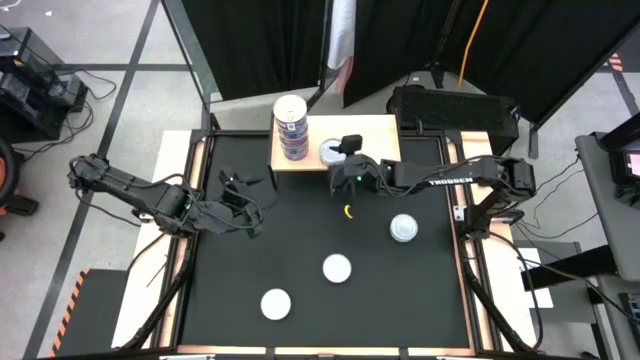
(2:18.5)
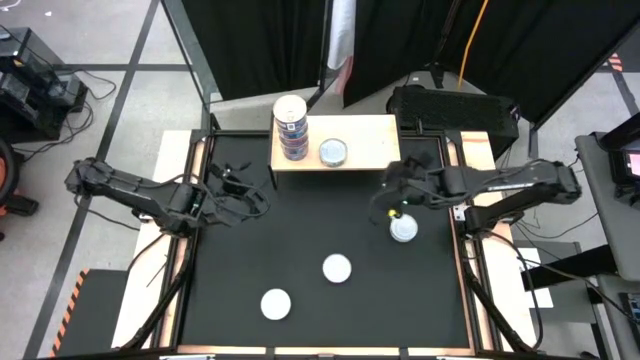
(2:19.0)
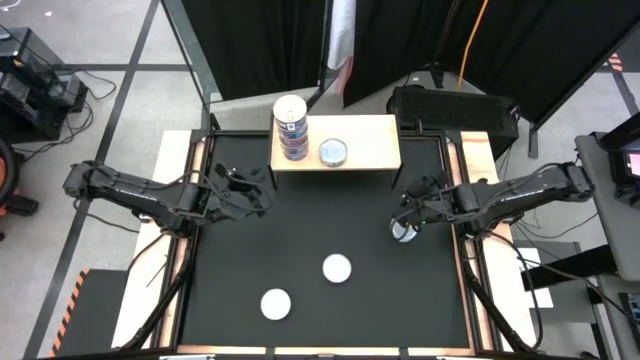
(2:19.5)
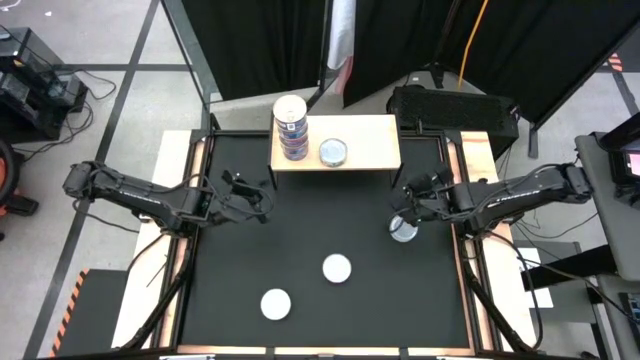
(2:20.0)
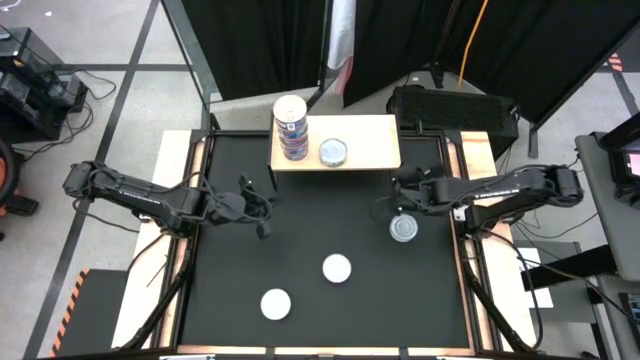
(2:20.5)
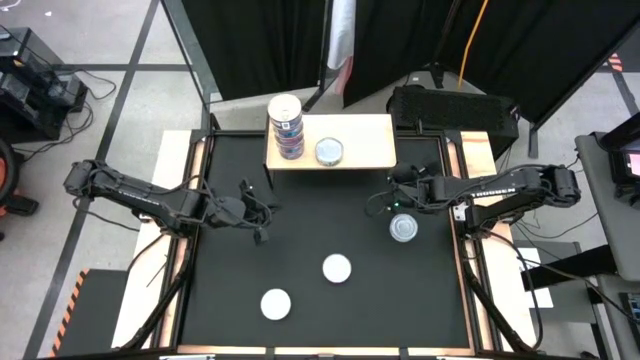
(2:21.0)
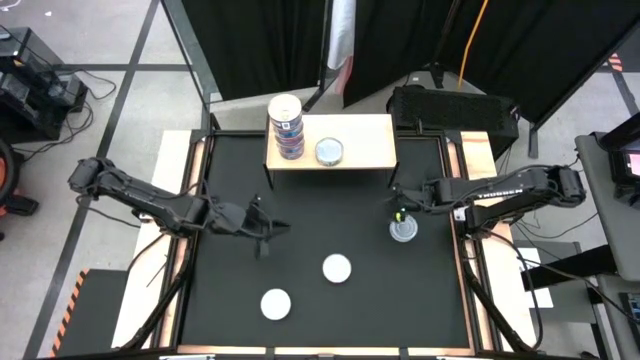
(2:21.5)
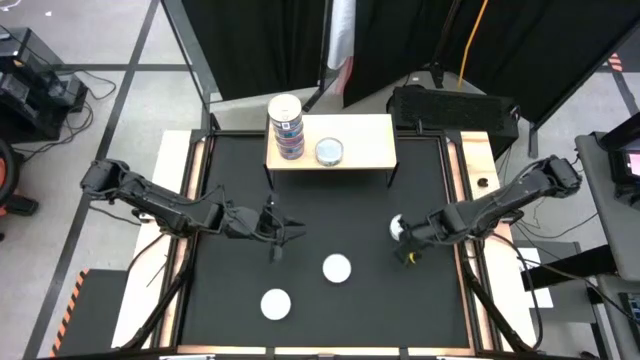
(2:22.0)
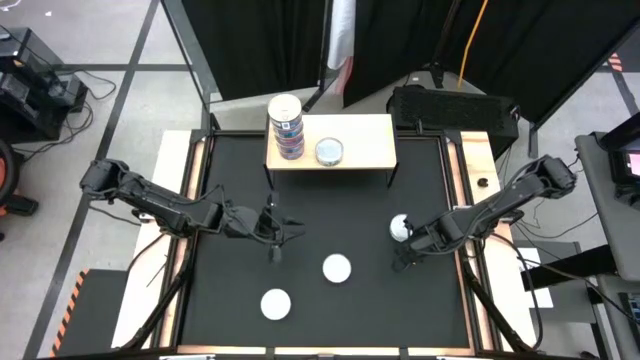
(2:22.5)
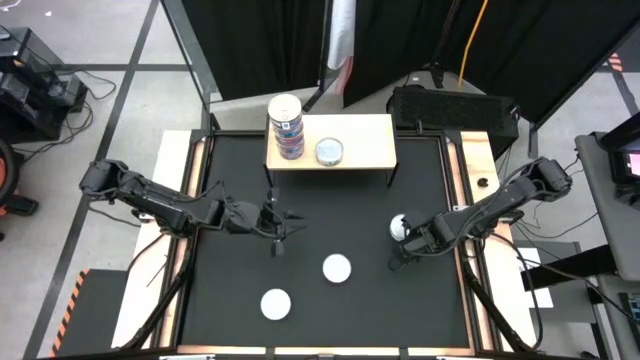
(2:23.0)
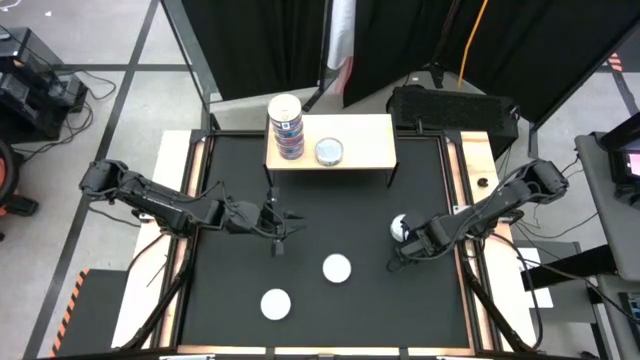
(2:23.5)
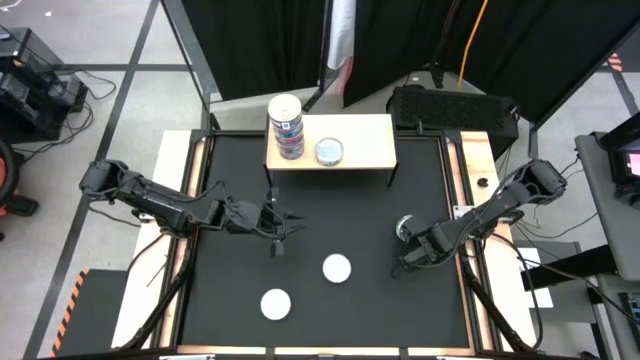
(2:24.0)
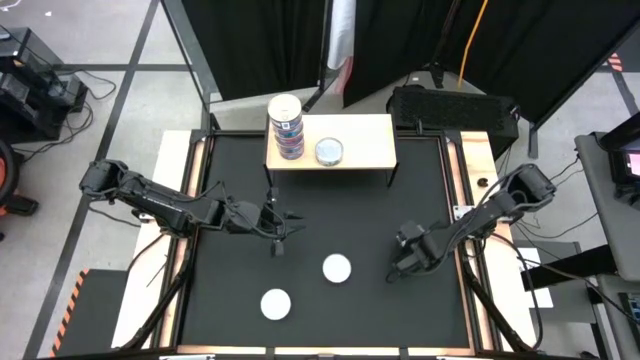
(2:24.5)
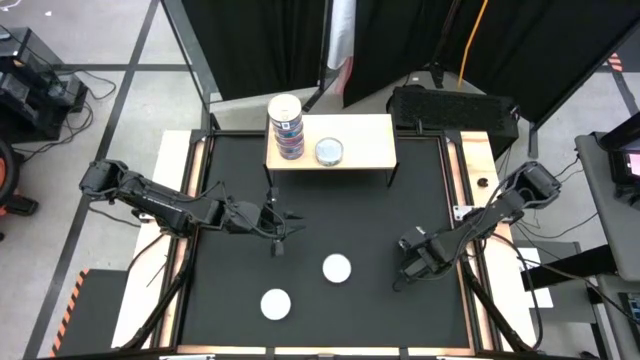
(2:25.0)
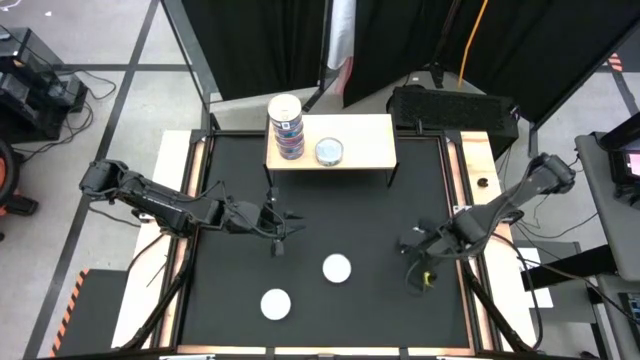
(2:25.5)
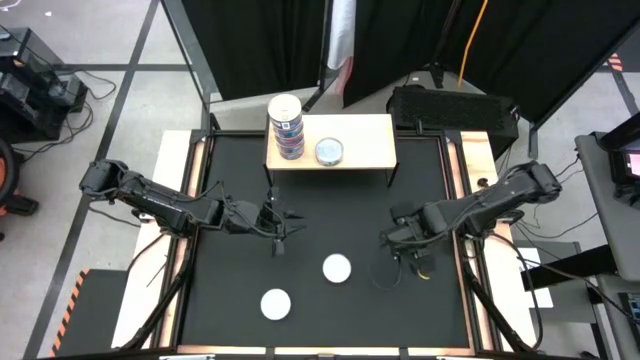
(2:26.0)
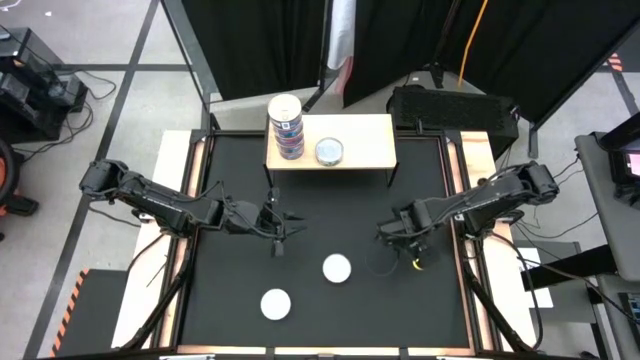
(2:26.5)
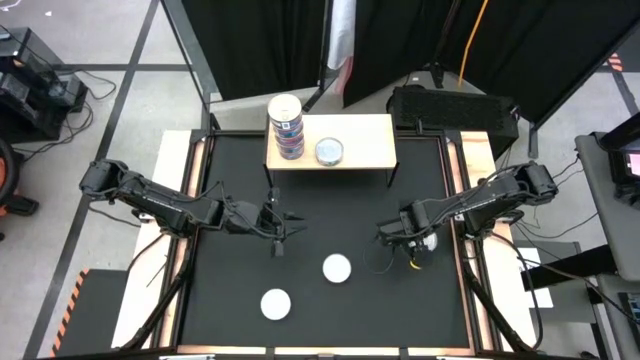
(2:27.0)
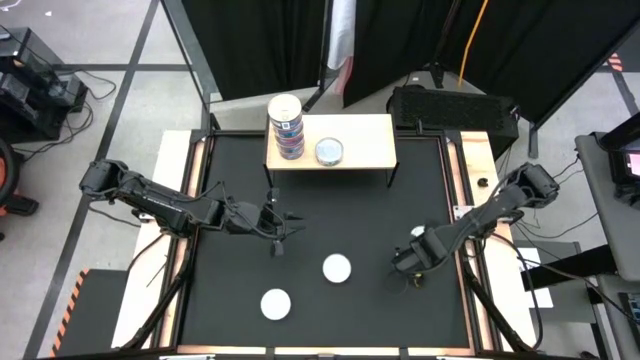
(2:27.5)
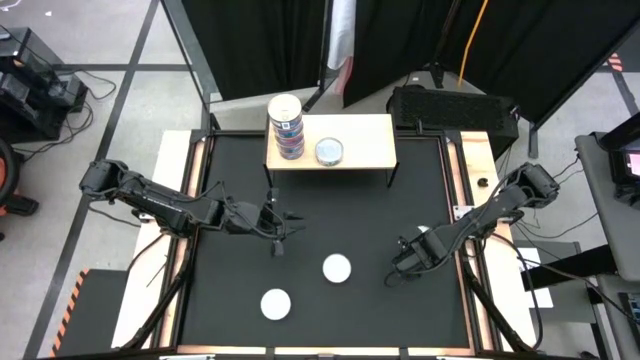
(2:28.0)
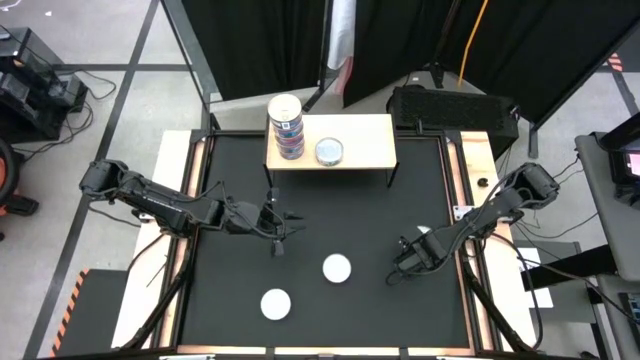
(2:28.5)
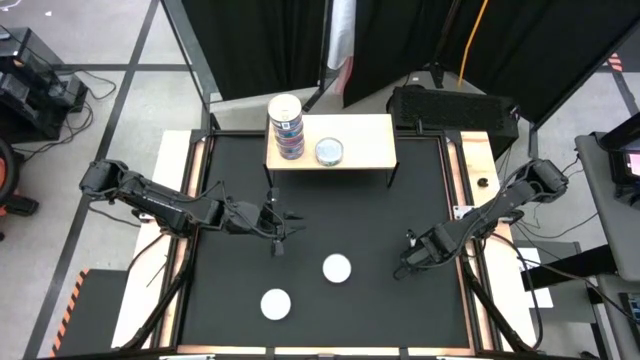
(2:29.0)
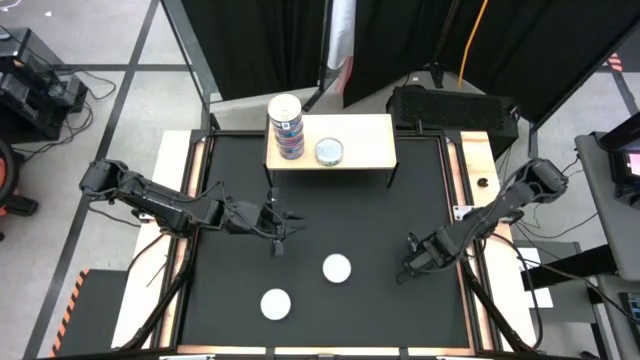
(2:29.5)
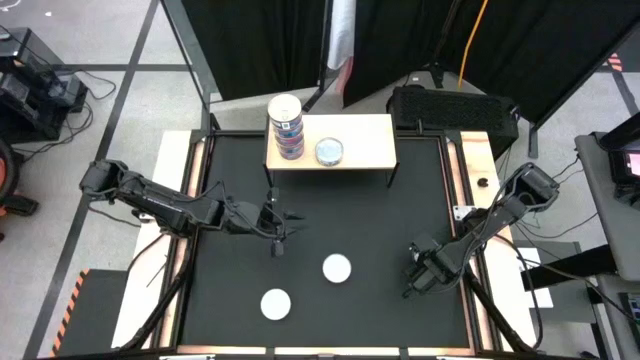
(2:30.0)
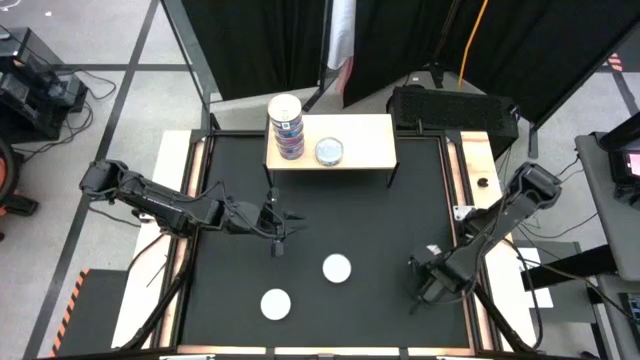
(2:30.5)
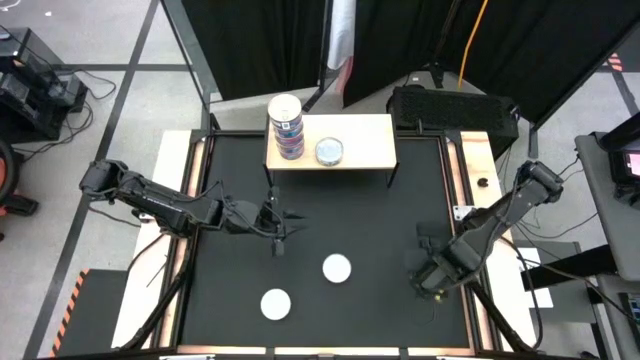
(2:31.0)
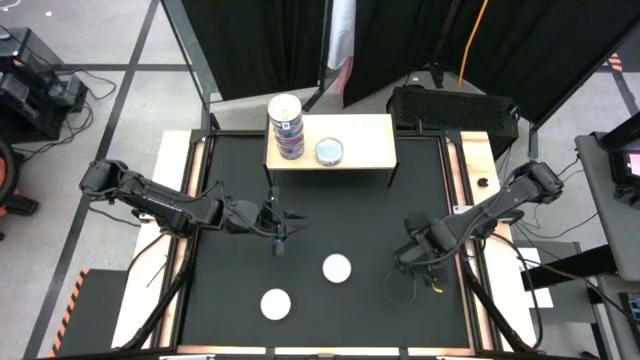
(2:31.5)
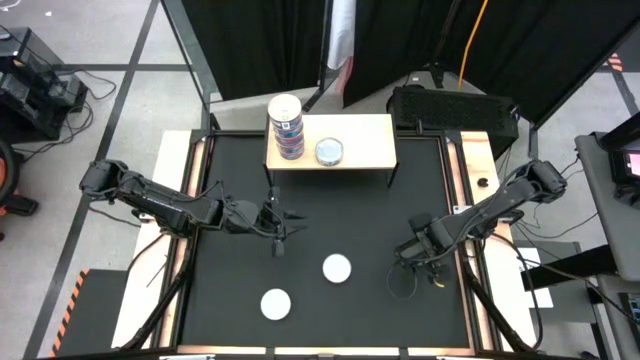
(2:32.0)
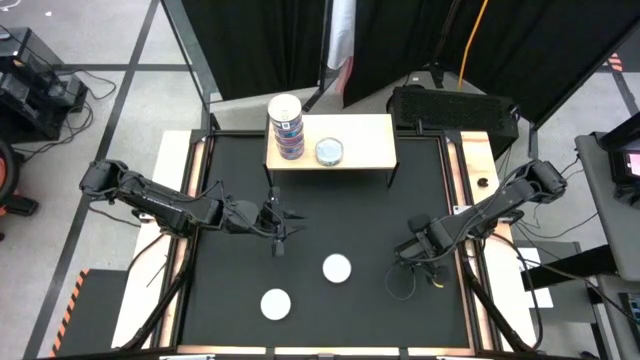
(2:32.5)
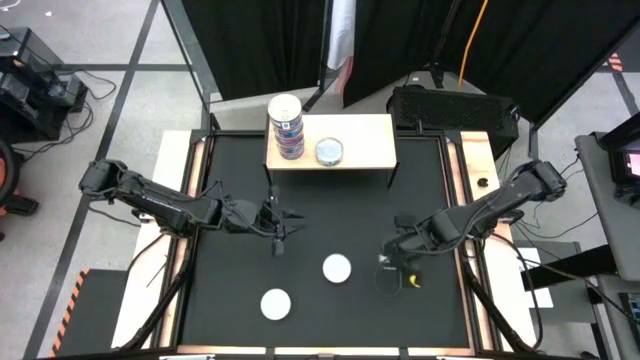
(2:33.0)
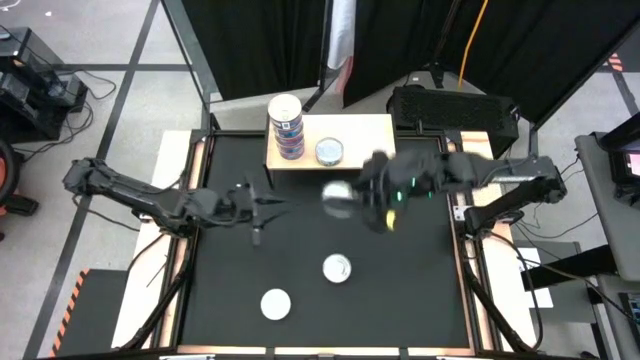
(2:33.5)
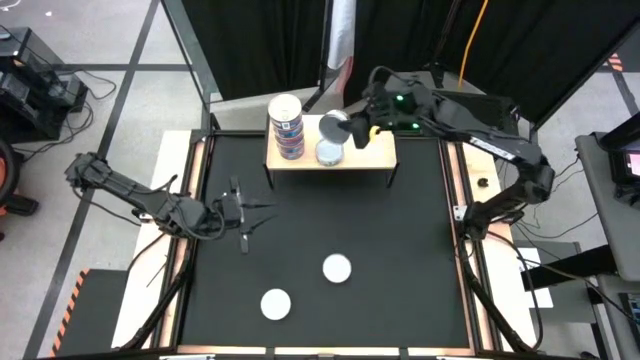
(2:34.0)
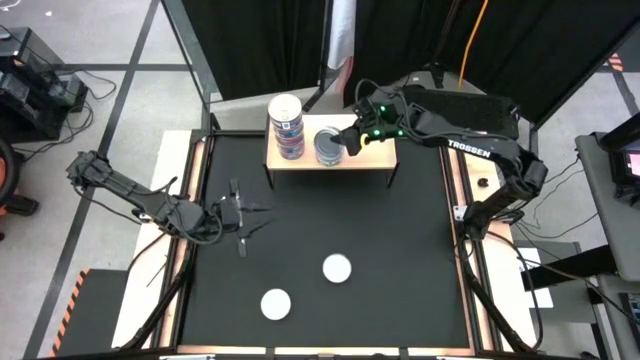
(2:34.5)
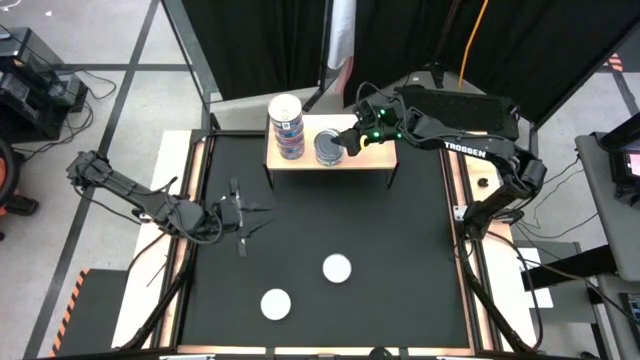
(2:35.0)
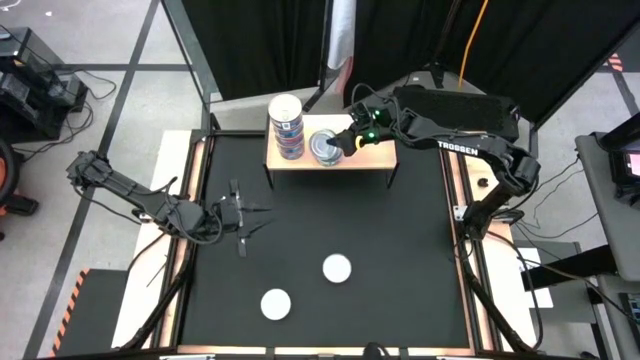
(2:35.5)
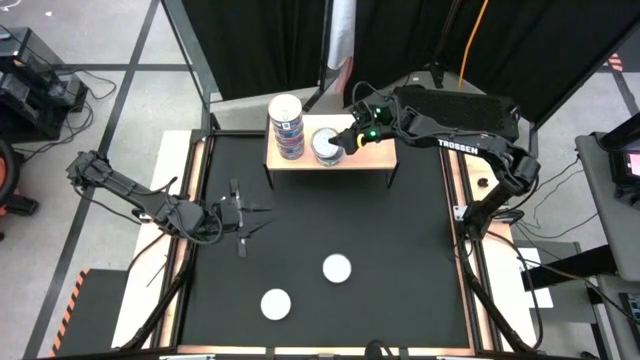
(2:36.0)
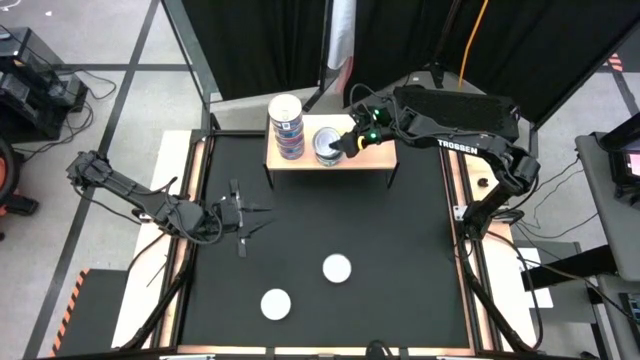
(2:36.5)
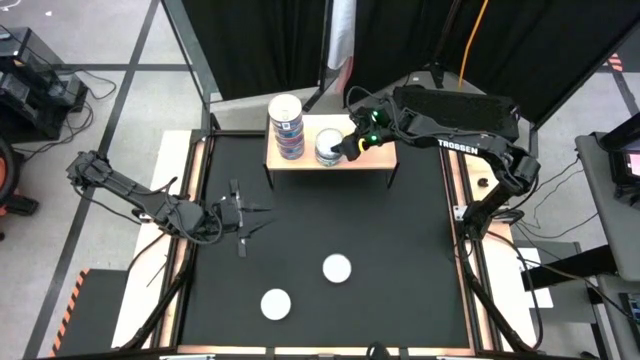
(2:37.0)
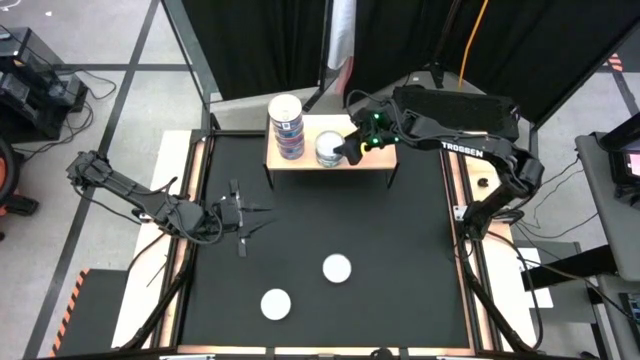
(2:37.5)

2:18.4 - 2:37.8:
Task: Stack canned seafood by type on shelf
Stack the green tuna can on top of the other green tuna can on the shelf

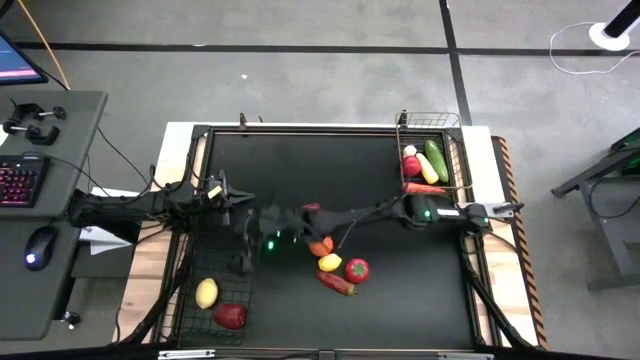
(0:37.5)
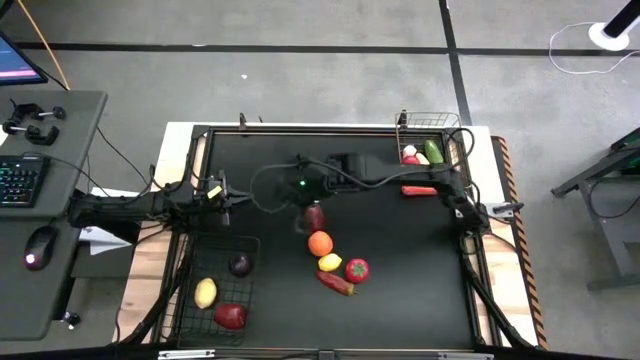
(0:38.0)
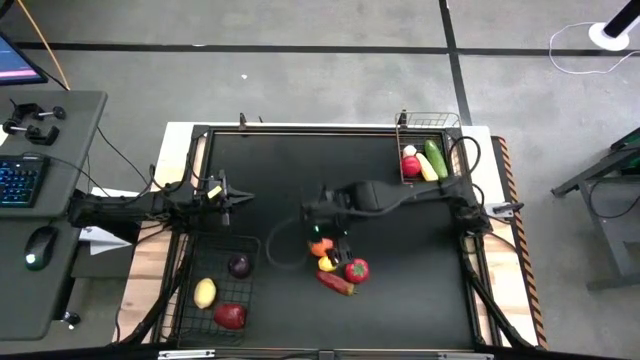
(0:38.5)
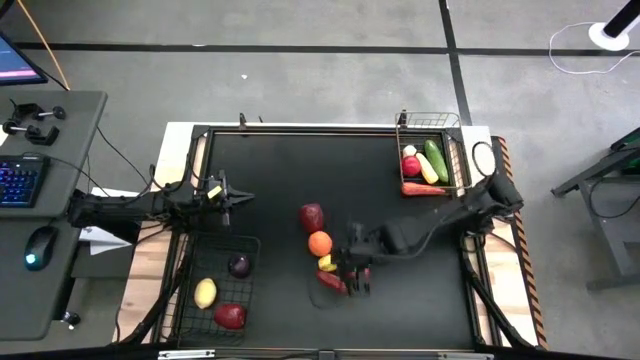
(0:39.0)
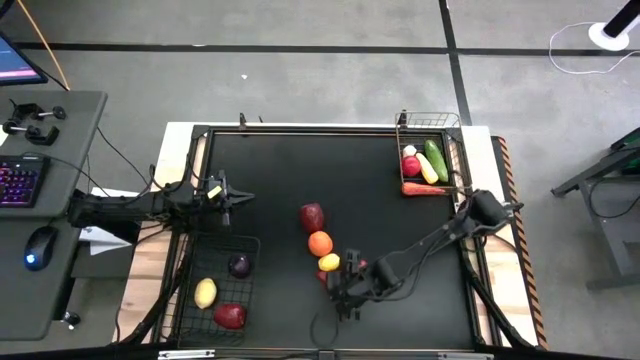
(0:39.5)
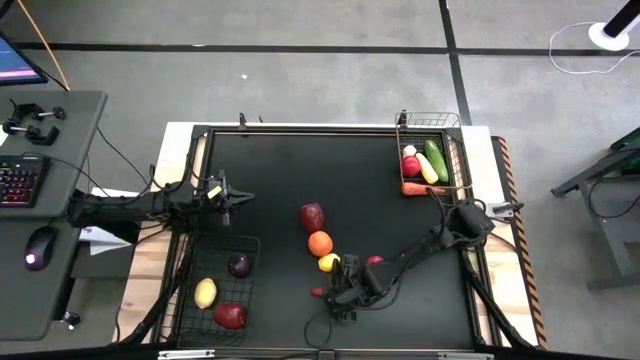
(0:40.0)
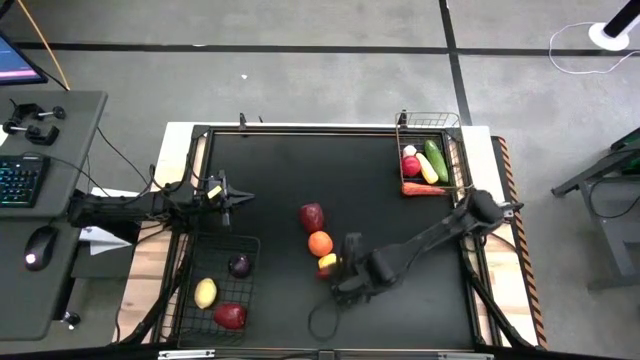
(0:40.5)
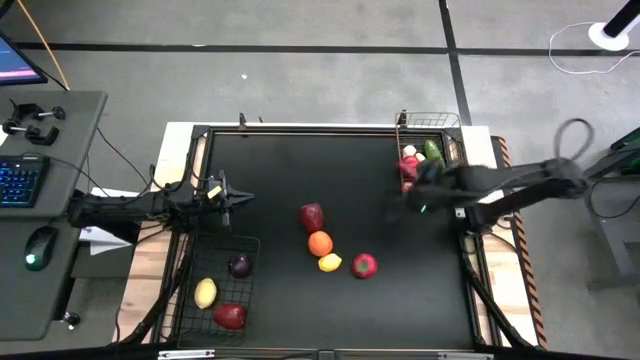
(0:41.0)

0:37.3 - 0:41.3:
Task: Sort produce into baskets
Put the chili into the right wire basket
